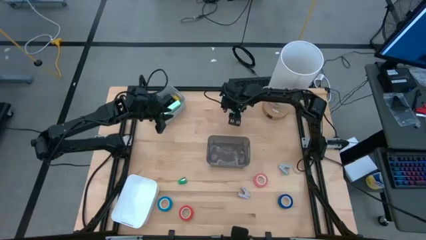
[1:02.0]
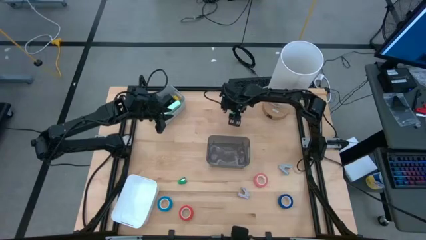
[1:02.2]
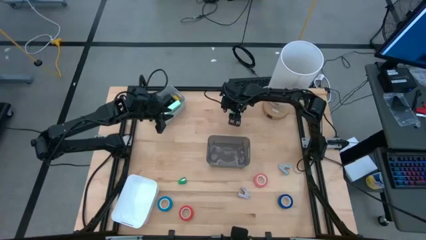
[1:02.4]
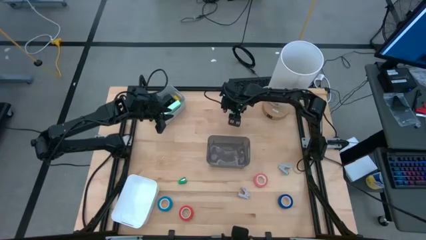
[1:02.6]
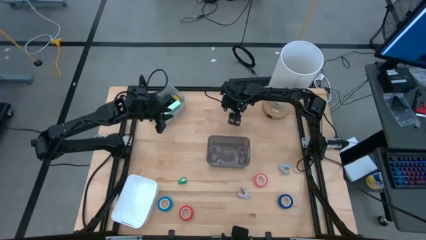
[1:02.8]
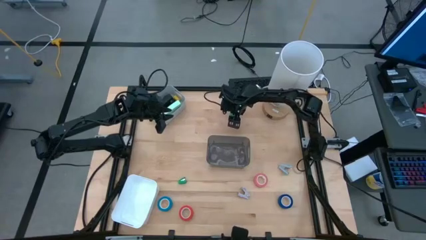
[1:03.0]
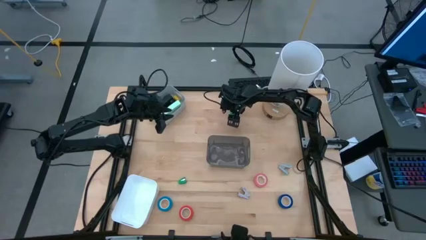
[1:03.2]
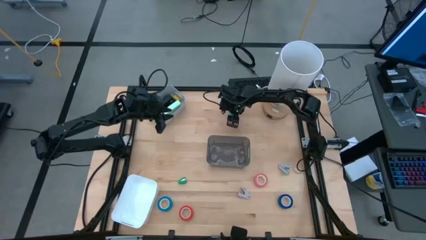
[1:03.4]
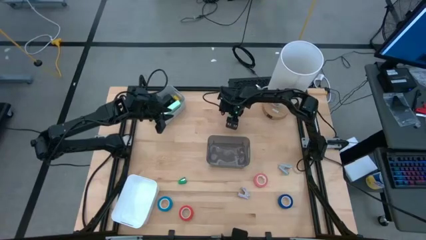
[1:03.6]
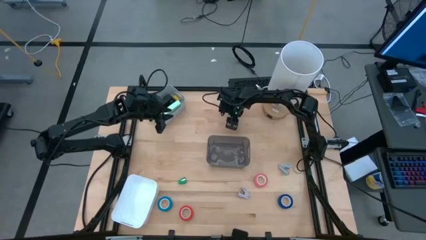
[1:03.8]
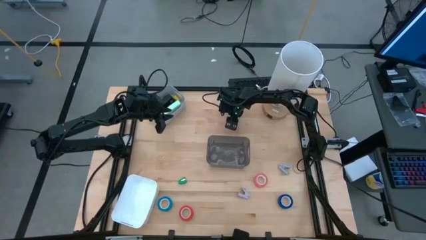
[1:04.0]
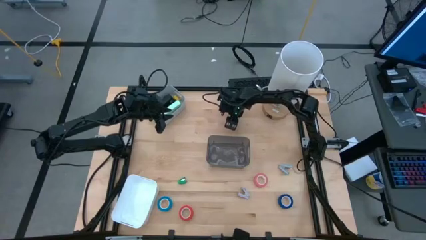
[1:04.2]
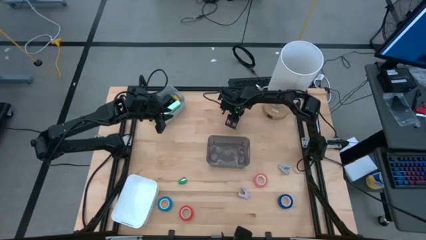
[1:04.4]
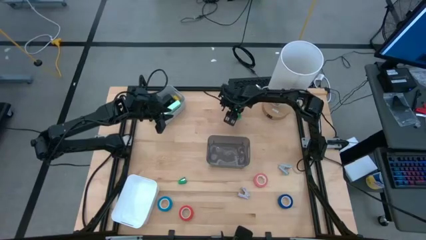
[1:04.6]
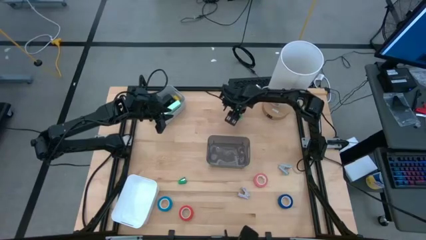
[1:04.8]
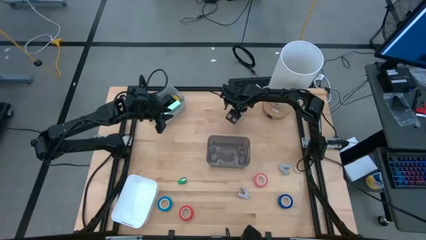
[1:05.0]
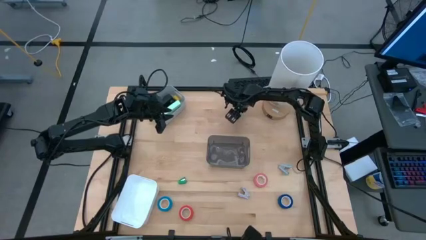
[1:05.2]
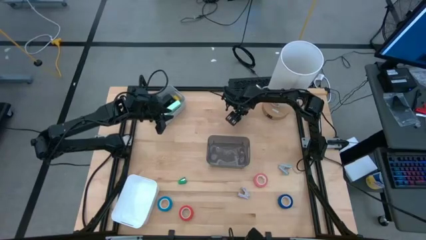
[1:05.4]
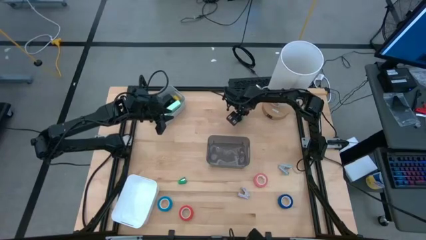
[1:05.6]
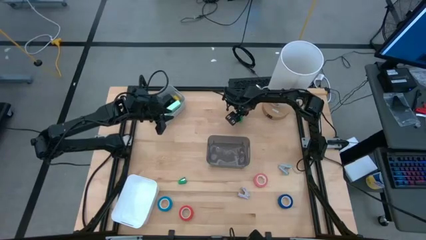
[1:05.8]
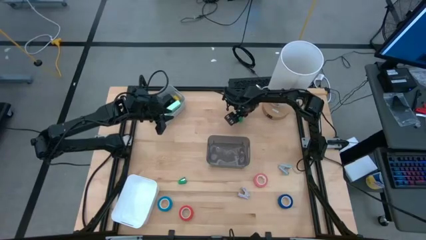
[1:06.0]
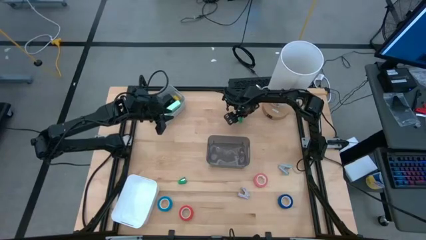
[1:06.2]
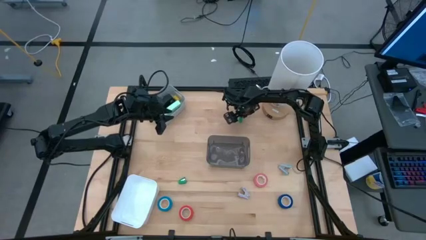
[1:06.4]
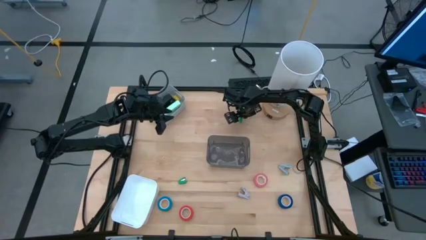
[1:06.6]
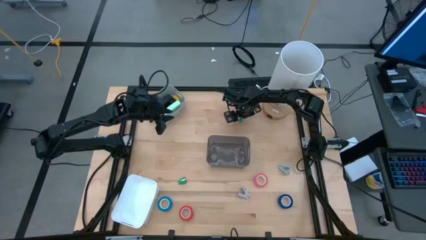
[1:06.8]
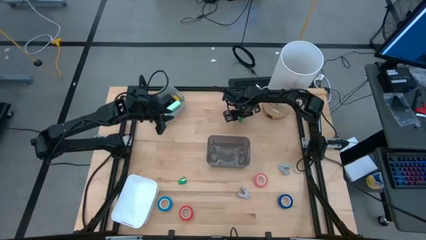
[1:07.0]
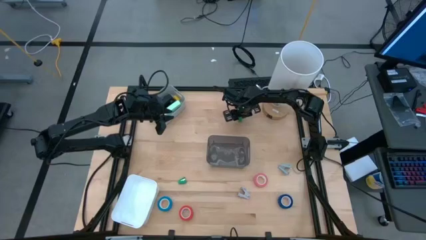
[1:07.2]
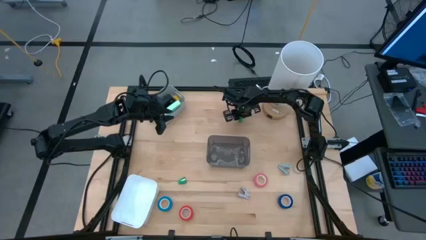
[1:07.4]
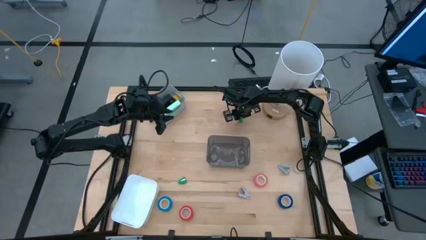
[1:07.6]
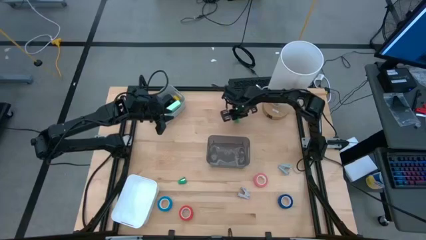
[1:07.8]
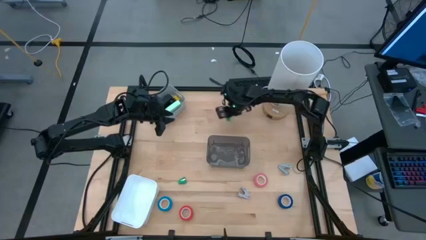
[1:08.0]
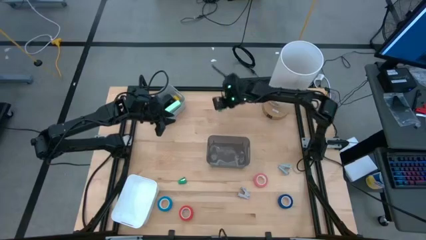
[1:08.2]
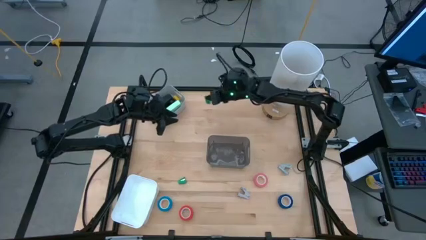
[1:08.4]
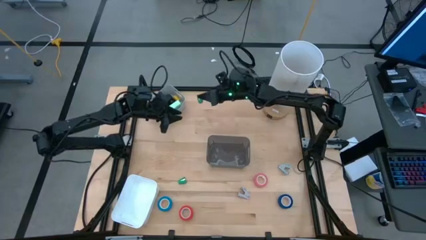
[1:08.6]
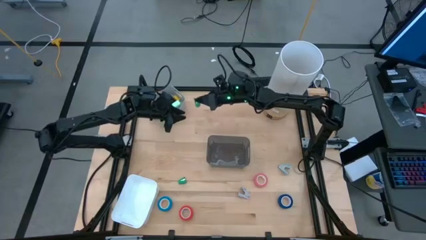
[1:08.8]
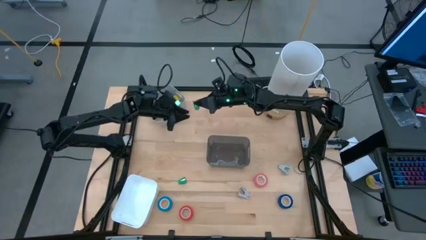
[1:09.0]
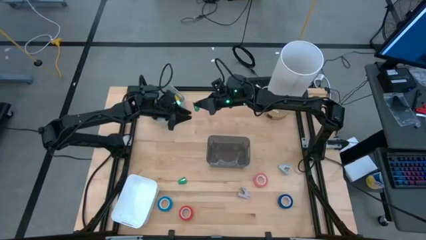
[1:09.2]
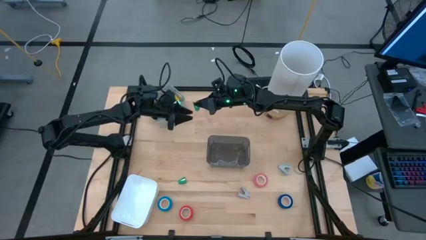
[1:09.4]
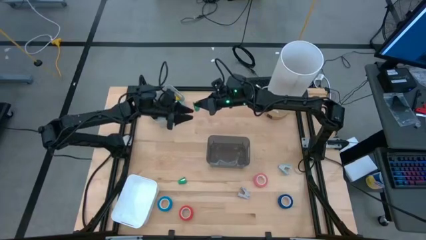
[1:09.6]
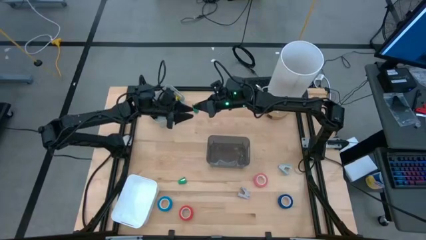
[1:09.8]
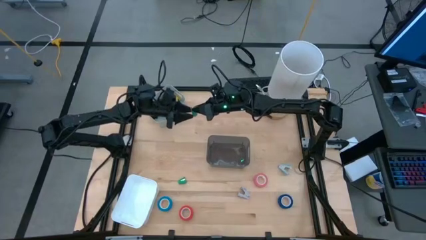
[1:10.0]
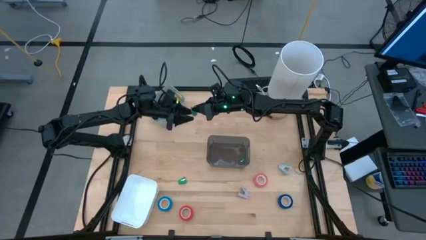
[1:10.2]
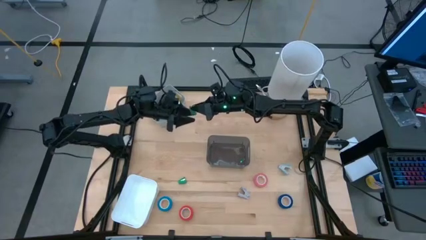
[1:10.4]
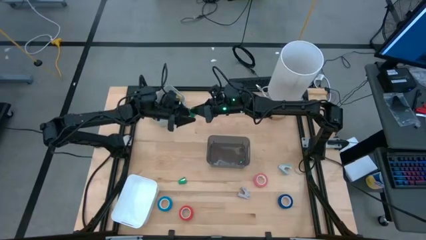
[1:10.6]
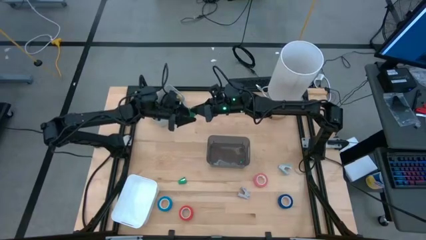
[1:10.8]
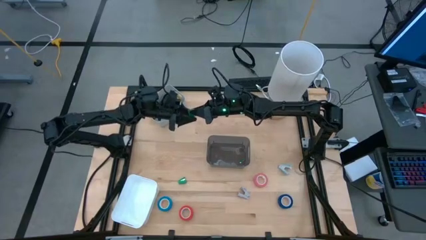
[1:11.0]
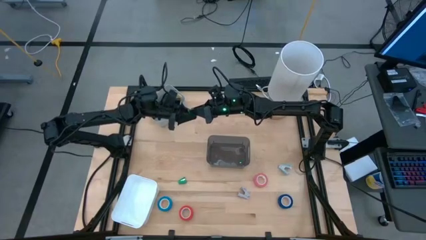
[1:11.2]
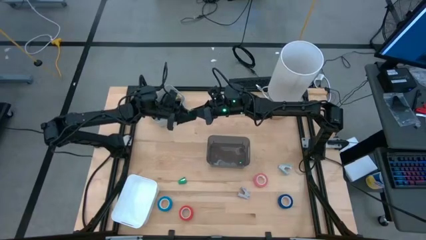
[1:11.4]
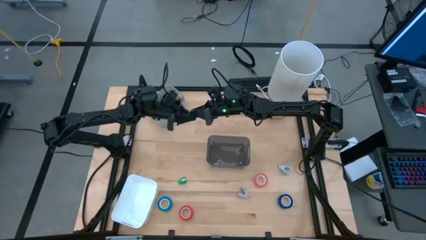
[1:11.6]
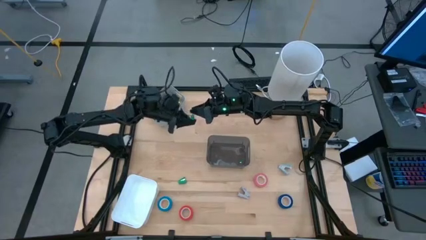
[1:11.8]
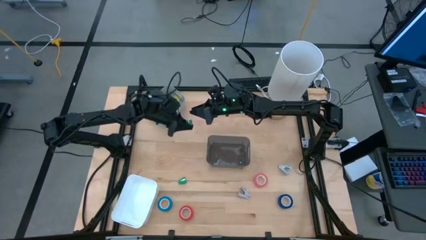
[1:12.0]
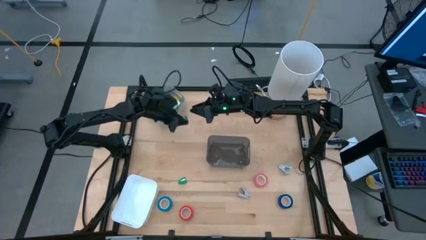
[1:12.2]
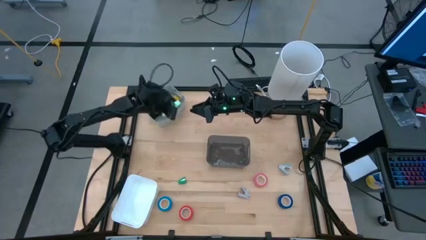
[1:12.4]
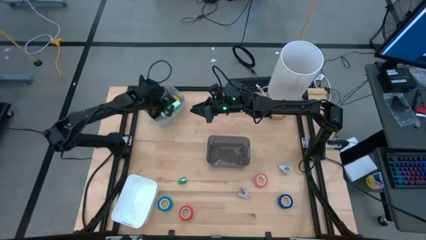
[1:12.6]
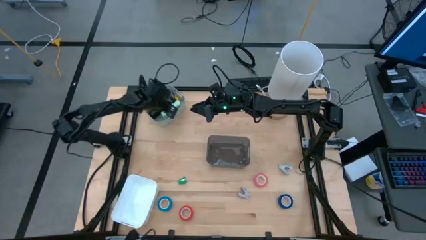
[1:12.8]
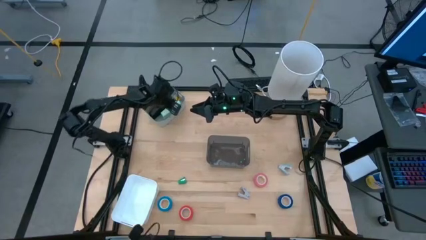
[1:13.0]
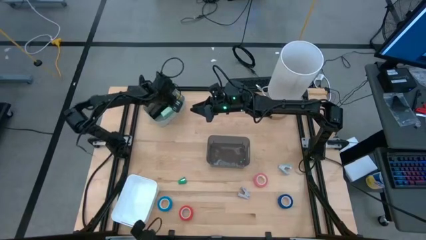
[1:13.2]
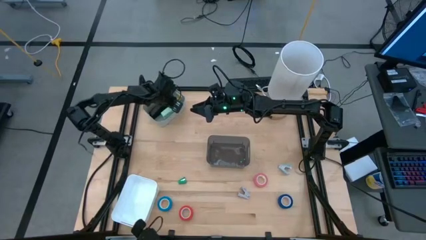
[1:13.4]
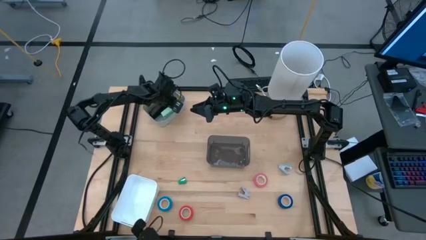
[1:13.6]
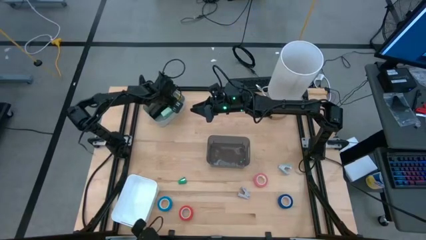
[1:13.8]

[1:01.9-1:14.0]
Task: Pick and place Stapler, Stapler remover, tape
Put the top green stapler into the gray bin

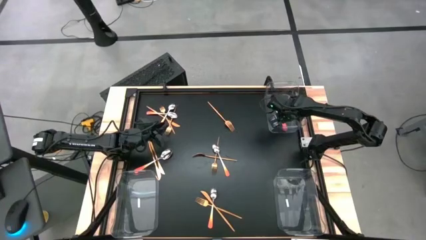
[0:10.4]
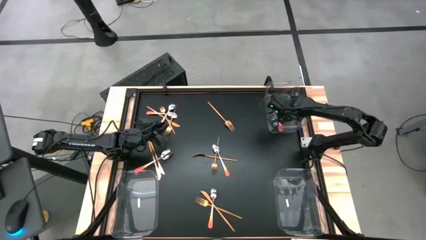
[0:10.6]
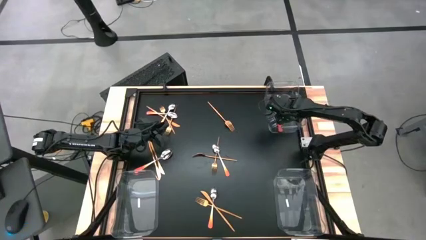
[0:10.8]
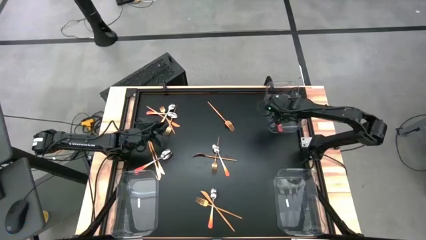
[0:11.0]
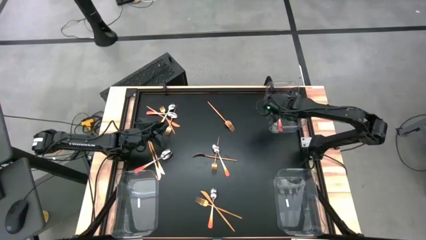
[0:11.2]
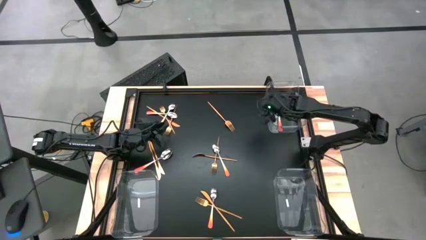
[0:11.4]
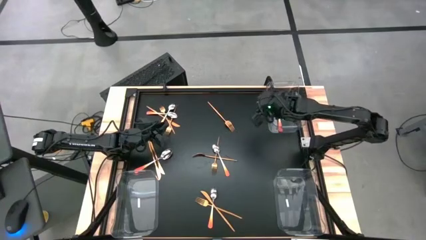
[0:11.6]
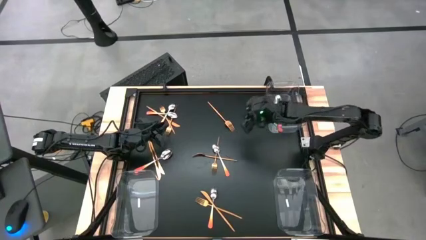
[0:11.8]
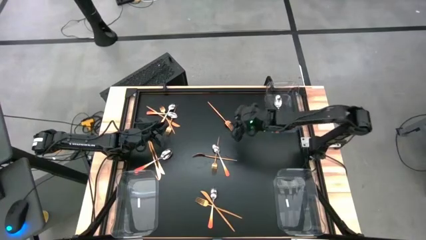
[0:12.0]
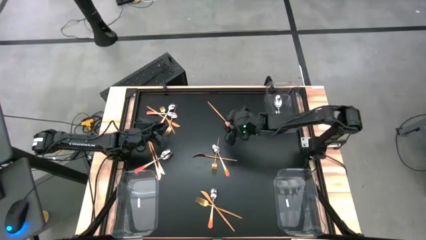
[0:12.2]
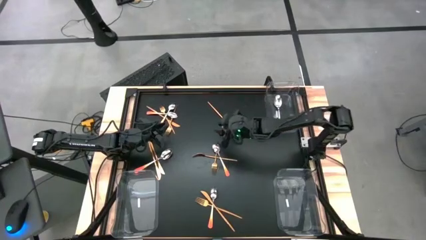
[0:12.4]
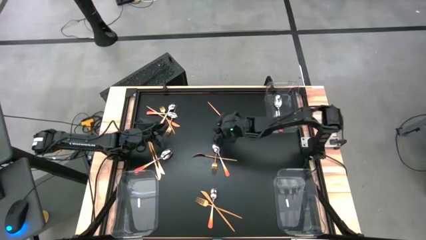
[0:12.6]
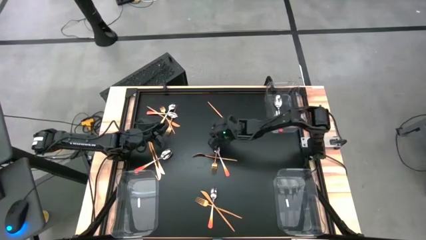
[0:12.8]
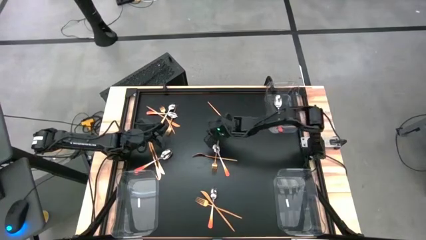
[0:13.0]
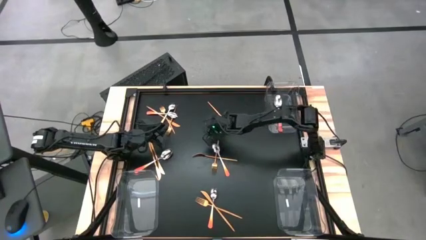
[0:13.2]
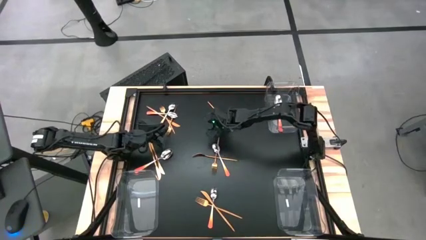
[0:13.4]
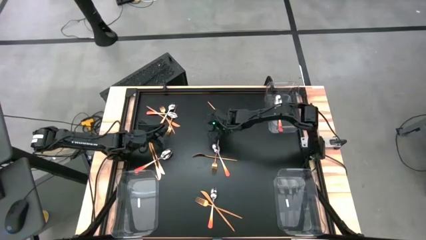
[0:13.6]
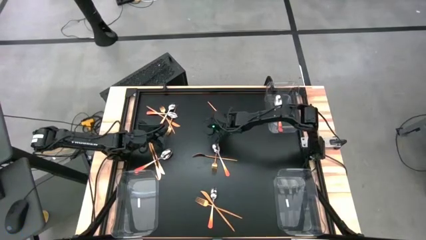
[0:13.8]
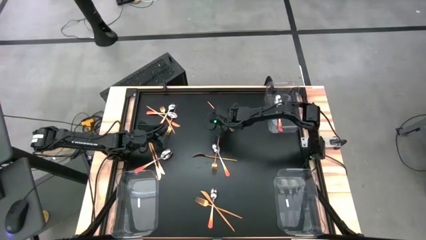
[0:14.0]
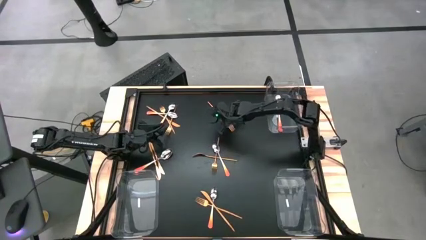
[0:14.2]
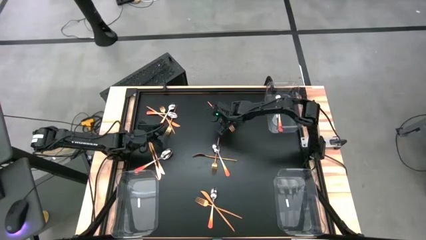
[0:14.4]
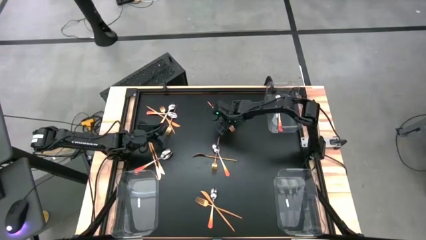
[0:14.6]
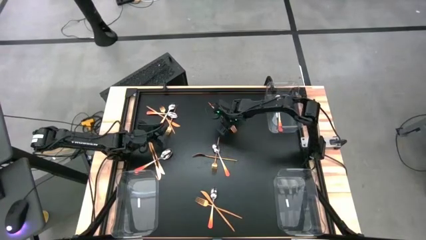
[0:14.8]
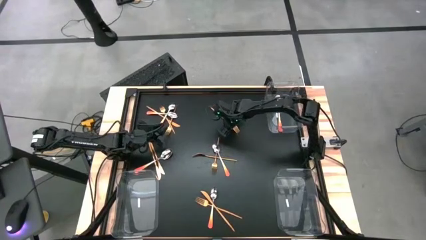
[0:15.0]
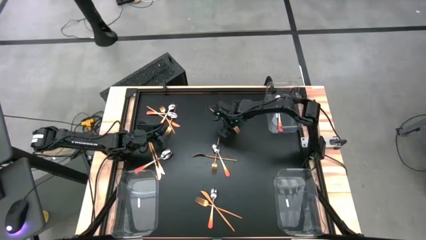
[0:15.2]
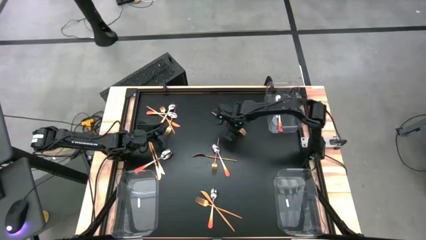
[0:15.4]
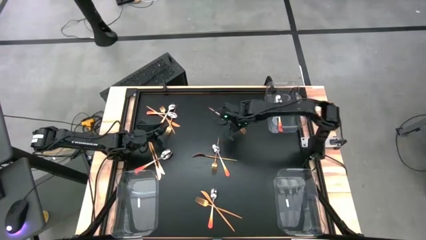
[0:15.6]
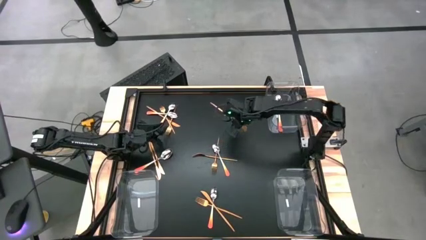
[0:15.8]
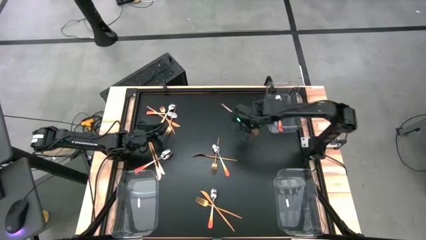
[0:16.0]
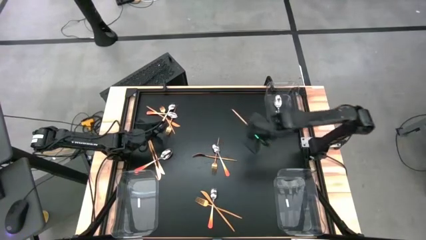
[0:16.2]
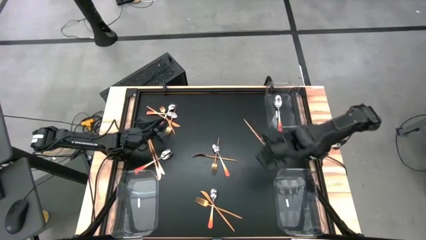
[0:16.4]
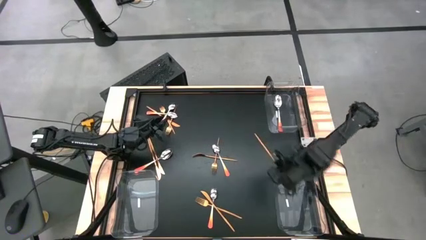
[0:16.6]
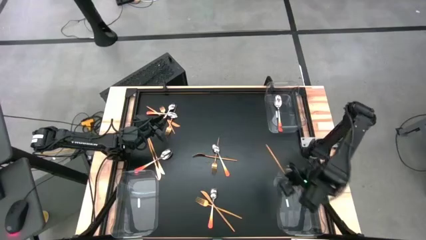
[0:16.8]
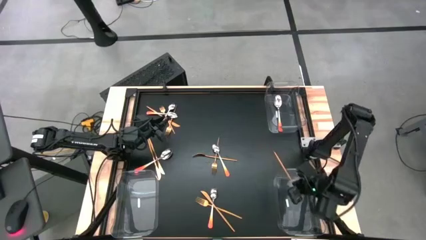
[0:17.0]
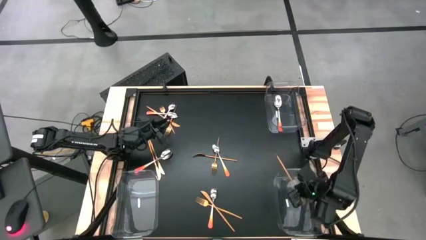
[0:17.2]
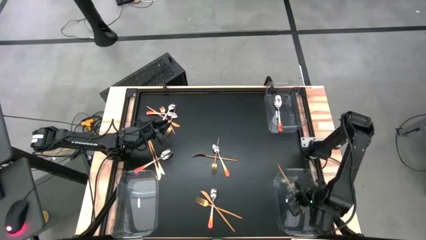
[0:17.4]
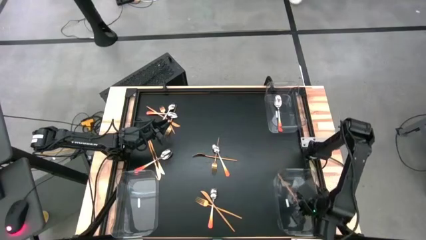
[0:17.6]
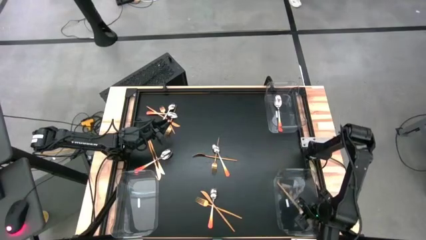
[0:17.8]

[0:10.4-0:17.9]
Task: Sort silverware by color (type)
Put the gold fork into the bottom right transparent bin
